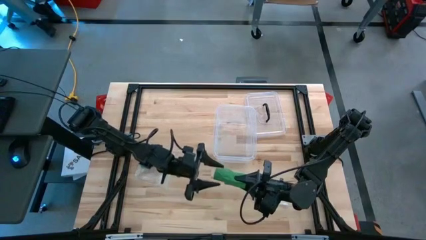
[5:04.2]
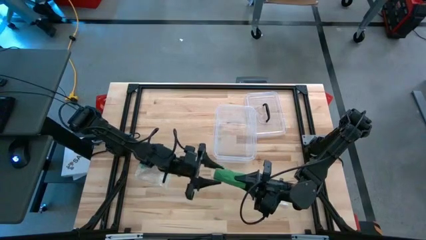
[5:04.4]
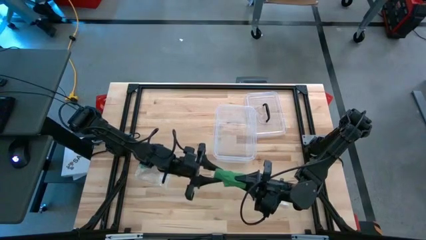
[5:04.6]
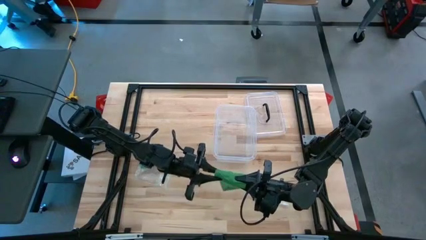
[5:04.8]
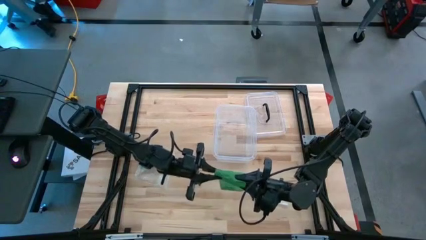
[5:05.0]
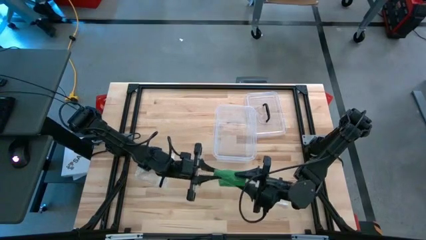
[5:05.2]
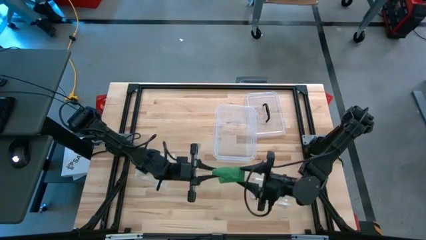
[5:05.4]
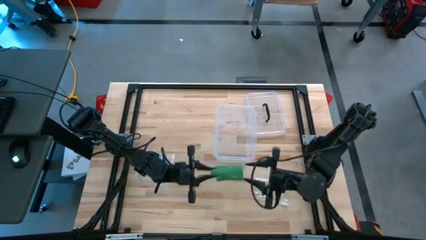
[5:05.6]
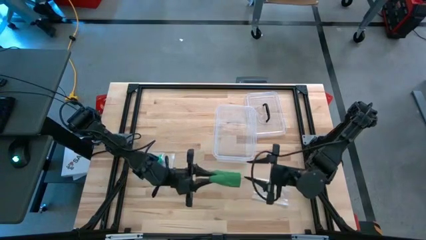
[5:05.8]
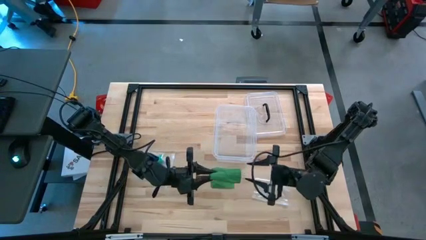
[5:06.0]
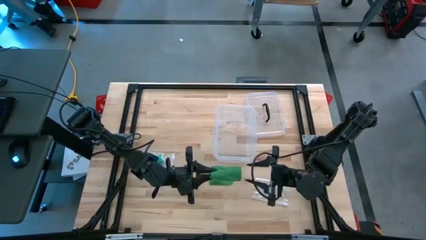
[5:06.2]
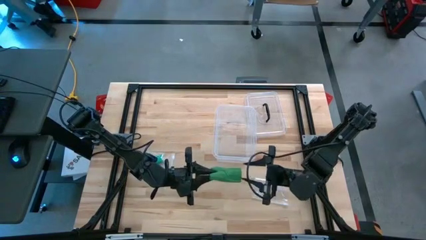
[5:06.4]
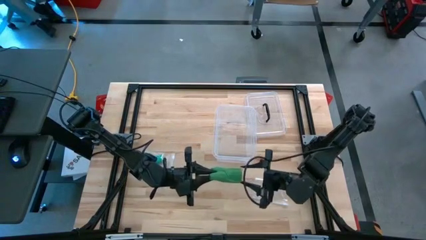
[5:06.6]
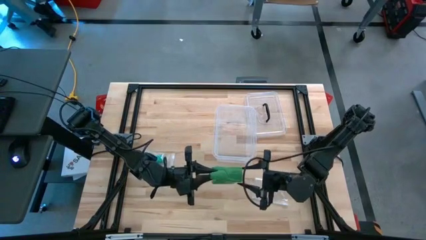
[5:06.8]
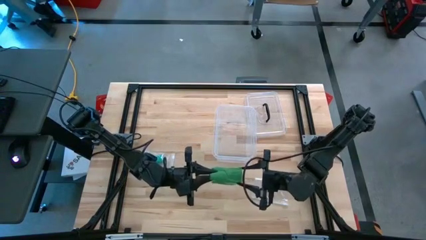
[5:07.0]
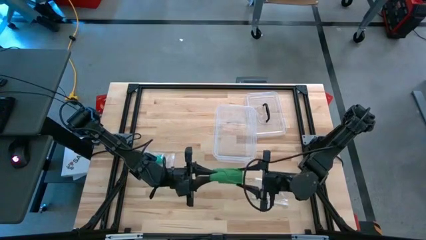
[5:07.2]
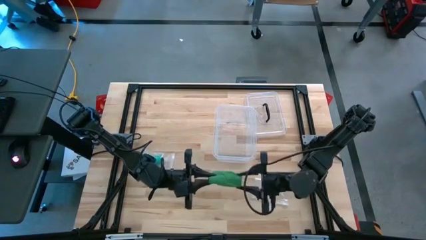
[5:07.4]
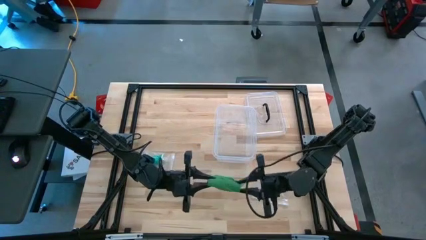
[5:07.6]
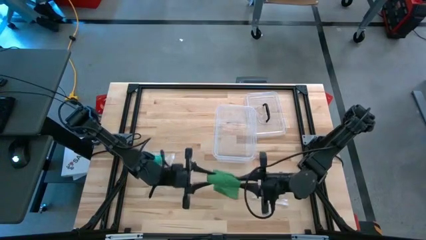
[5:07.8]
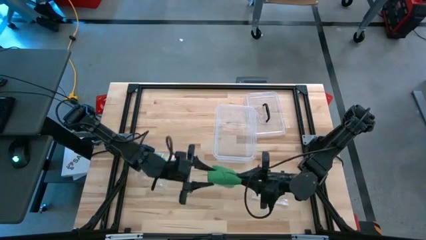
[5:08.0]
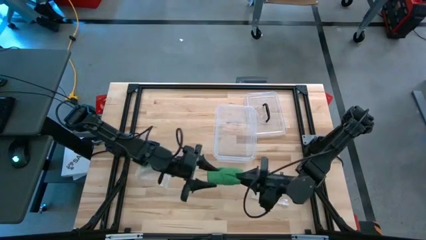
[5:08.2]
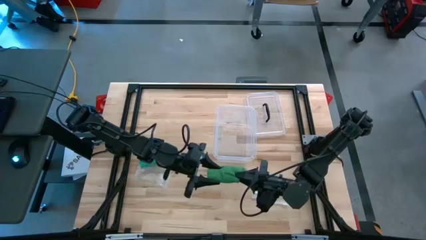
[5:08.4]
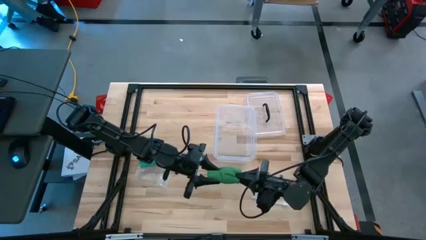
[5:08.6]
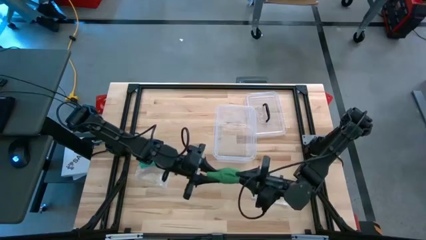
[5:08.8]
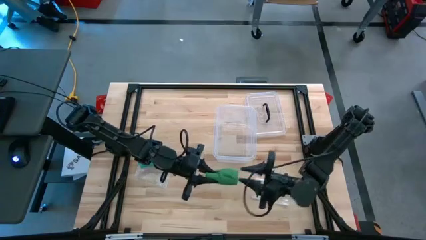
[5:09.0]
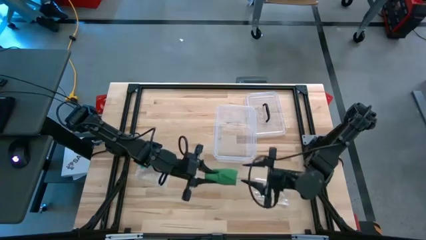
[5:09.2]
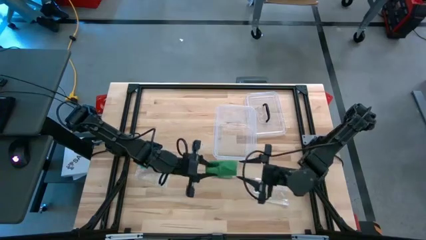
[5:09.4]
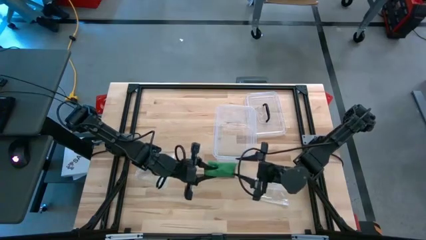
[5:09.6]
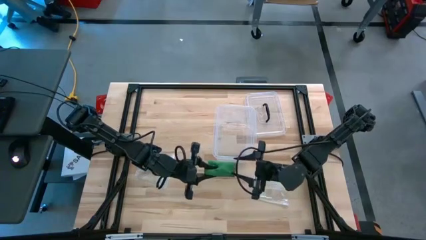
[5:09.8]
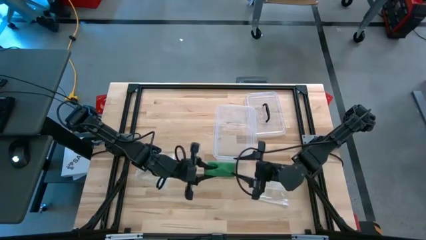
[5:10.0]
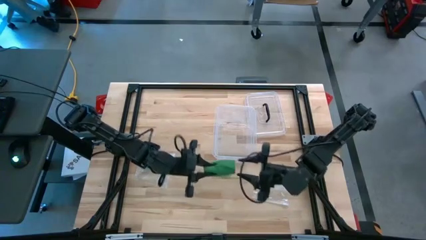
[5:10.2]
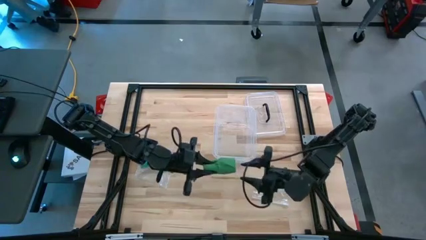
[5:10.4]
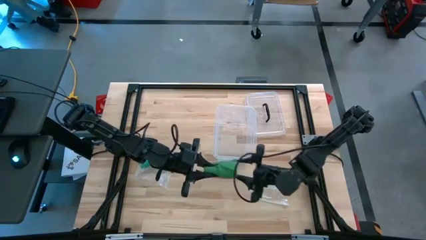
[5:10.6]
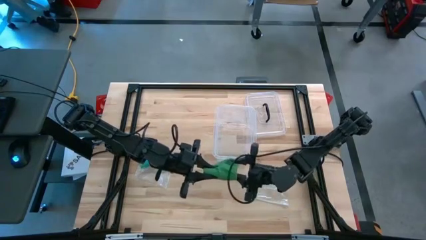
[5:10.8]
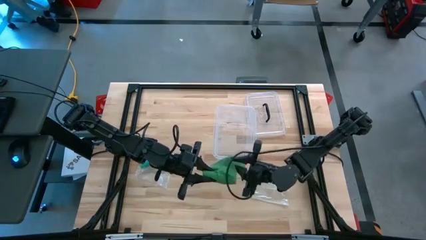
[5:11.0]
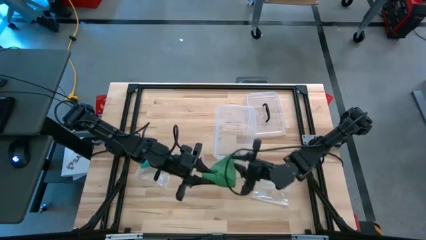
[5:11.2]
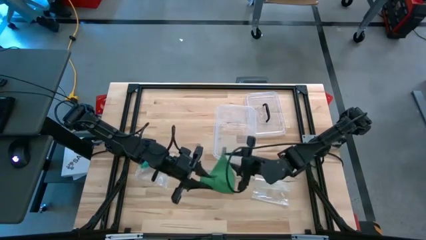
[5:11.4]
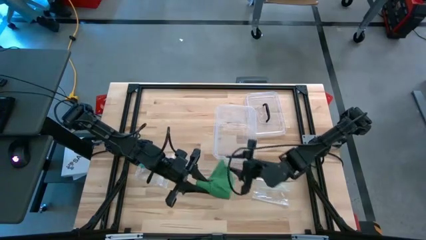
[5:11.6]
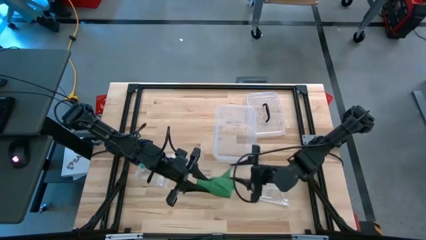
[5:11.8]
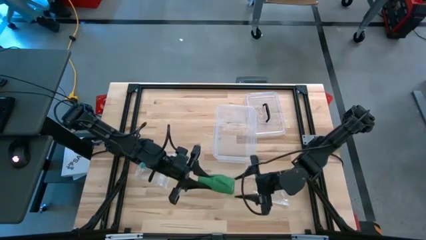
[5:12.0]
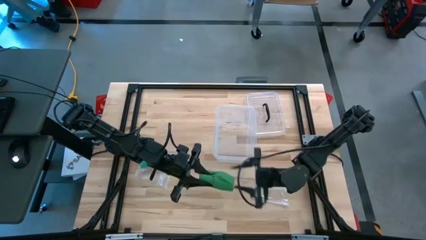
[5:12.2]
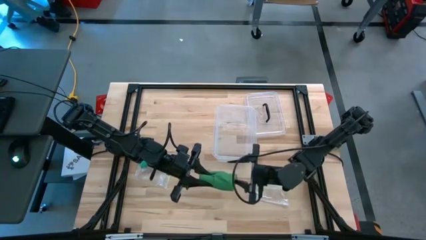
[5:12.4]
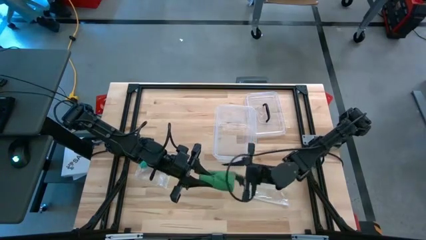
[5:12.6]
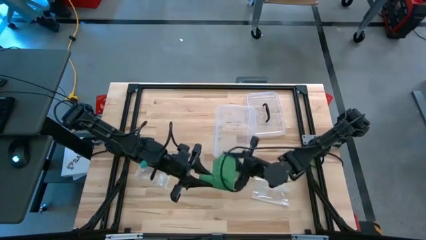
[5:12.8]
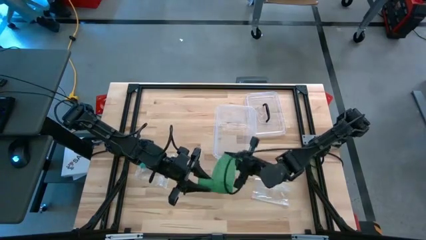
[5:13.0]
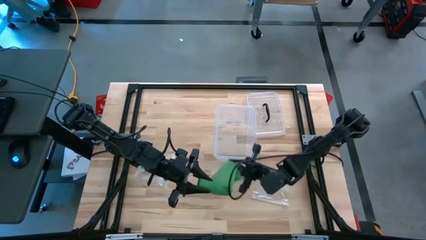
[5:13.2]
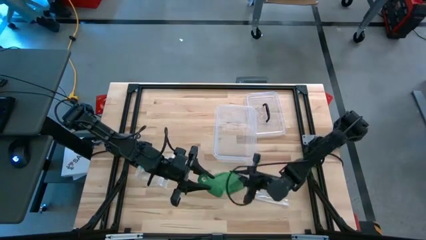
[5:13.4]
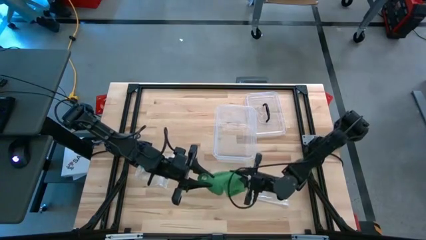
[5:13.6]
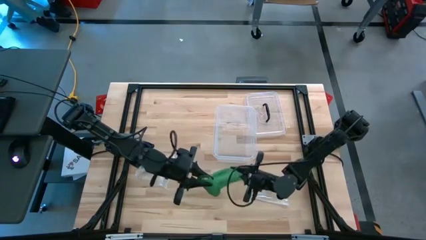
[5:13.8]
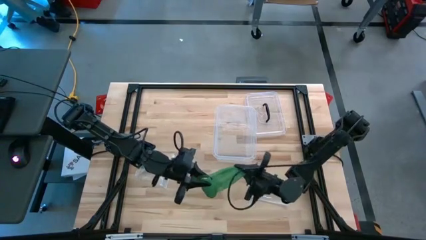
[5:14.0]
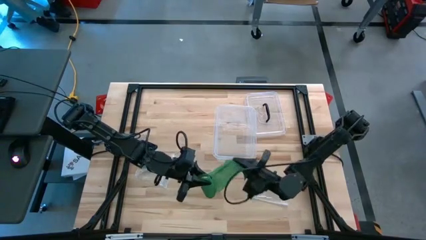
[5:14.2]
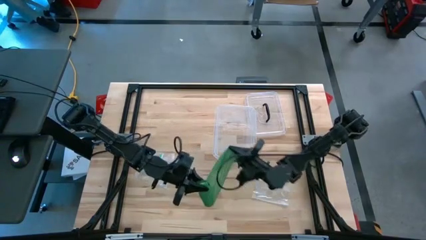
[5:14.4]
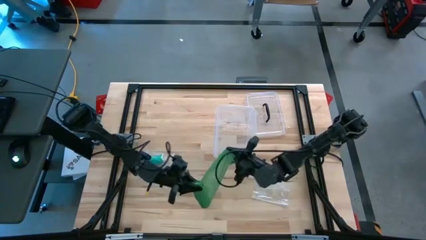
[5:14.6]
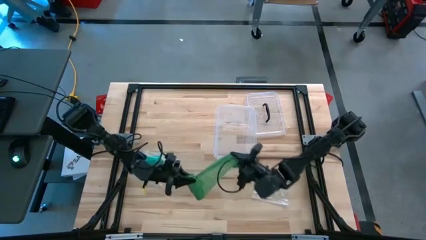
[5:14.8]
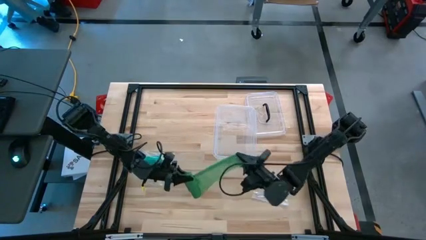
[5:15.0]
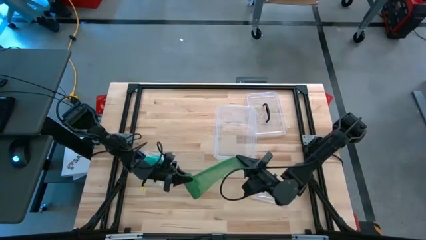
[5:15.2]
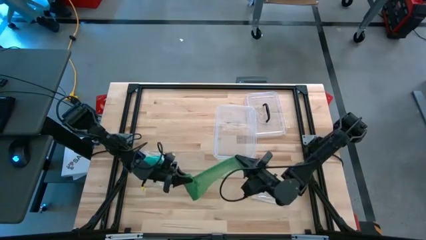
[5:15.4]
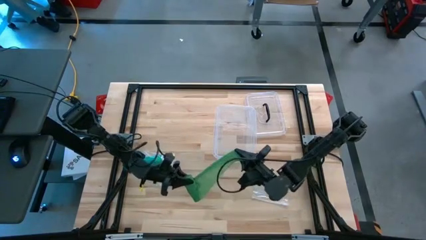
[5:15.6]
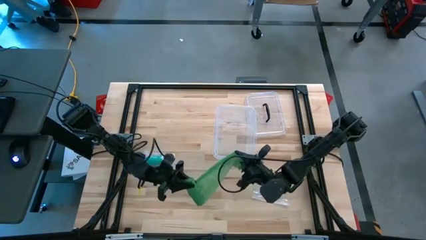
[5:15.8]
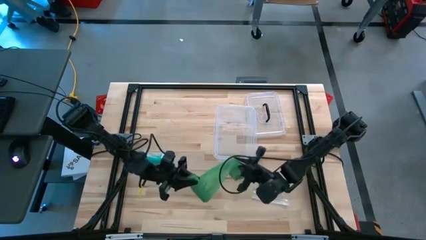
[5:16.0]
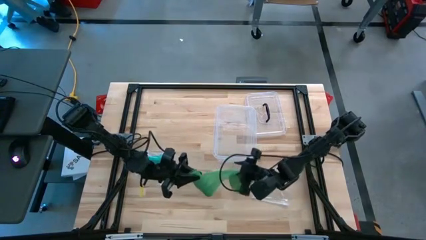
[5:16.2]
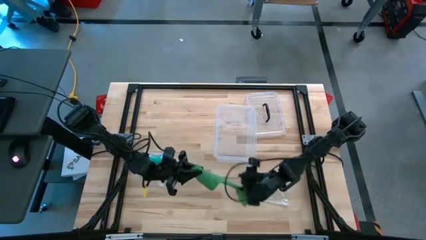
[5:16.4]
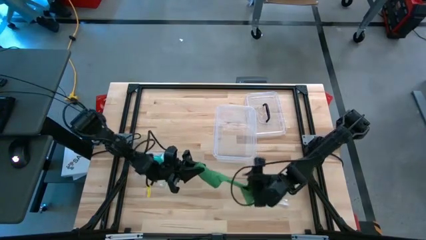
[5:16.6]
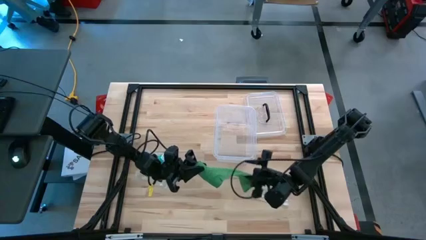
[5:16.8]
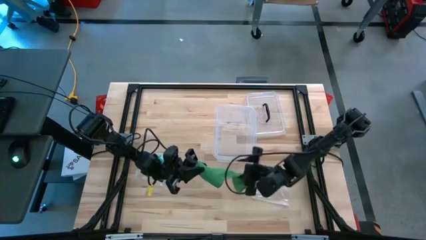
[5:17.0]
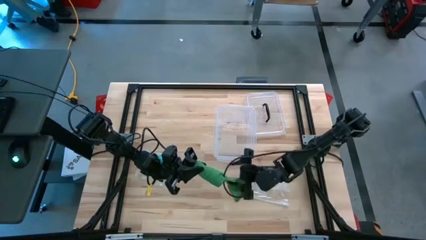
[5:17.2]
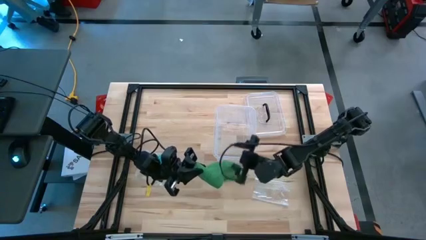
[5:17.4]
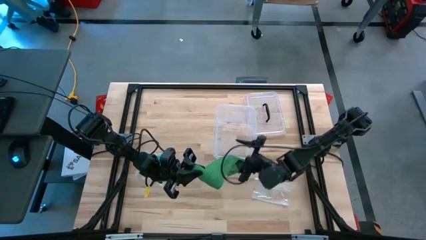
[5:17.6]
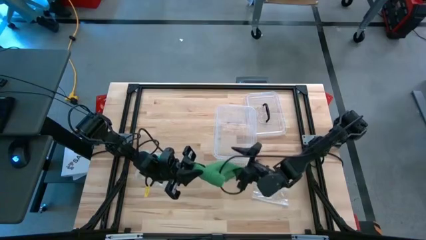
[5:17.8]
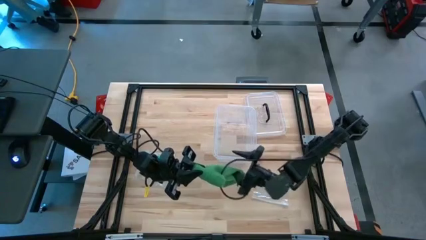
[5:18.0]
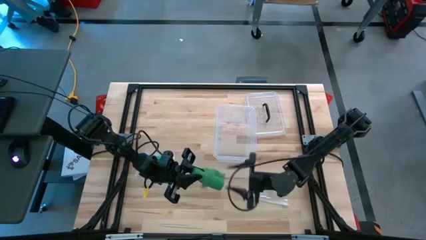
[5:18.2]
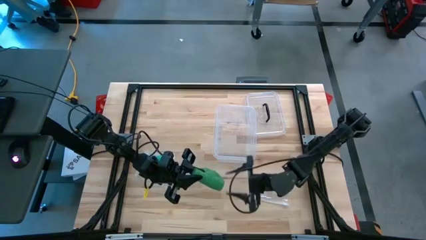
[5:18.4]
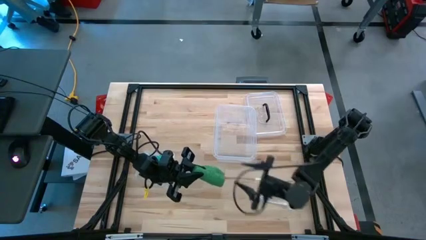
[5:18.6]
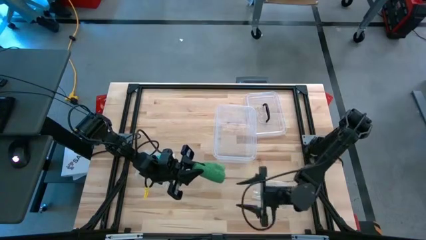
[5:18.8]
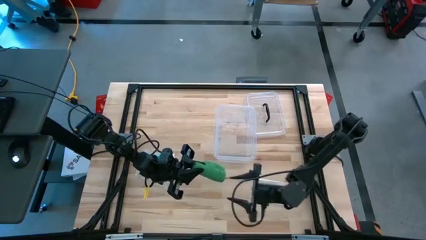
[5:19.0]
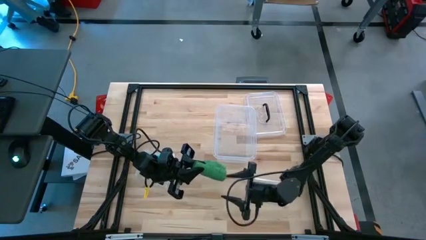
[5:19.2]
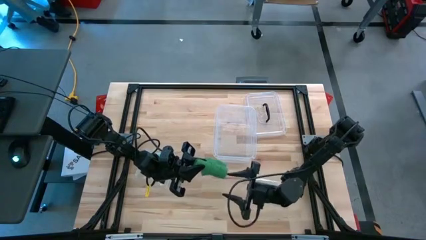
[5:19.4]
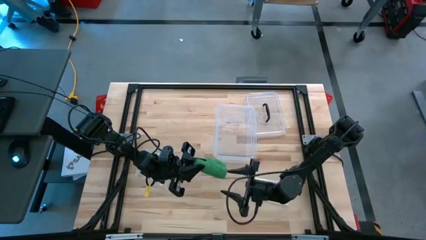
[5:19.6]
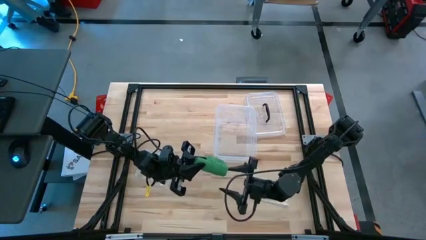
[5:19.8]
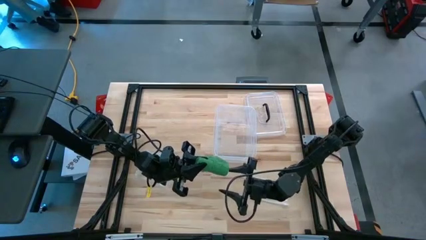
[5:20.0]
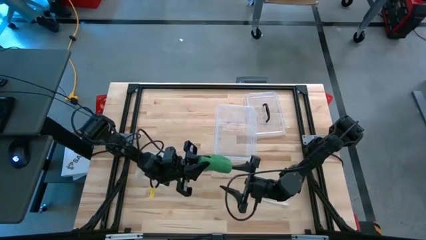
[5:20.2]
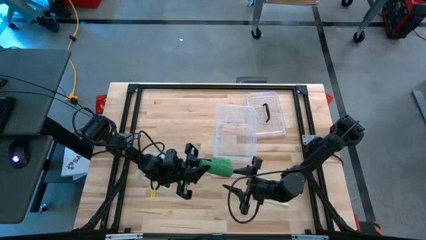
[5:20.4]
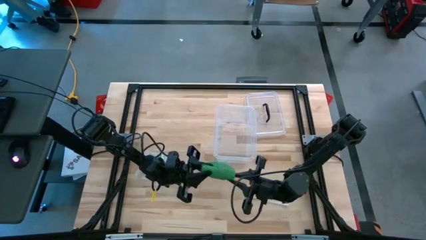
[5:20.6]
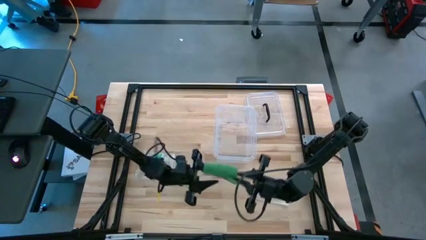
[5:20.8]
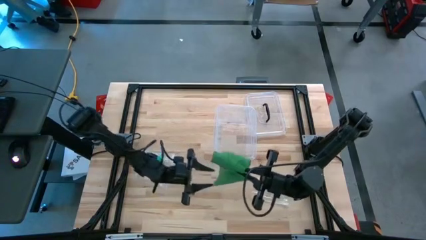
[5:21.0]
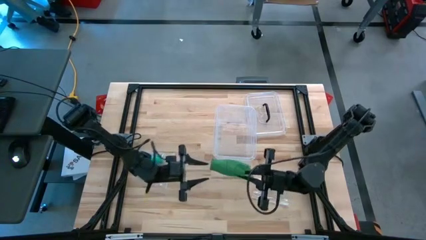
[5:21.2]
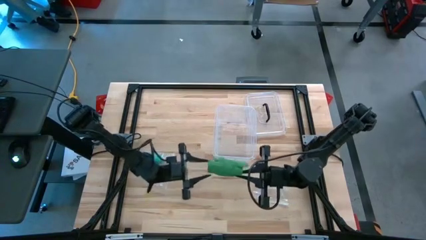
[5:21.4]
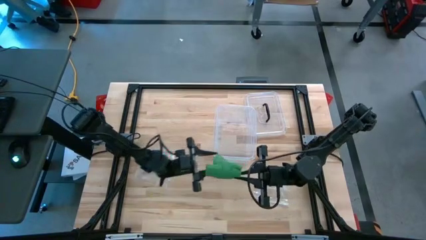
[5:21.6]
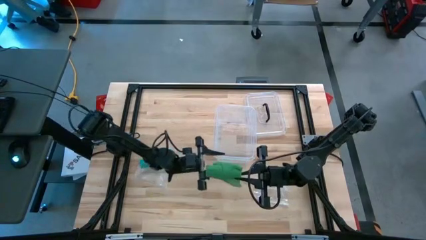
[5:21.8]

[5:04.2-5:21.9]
Task: Roll bandage
Roll the green bandage
